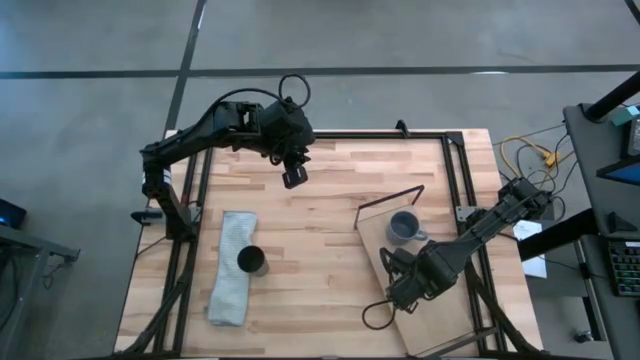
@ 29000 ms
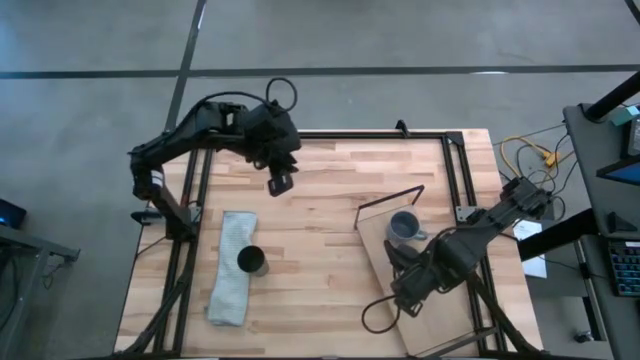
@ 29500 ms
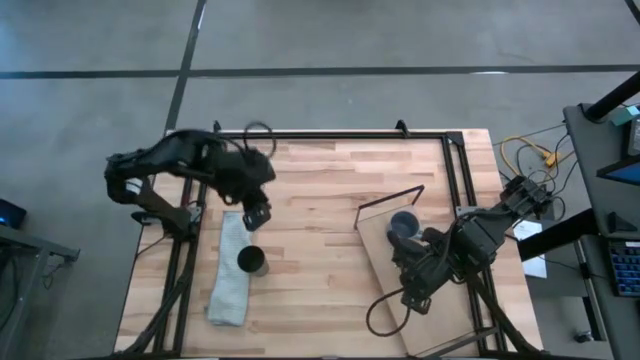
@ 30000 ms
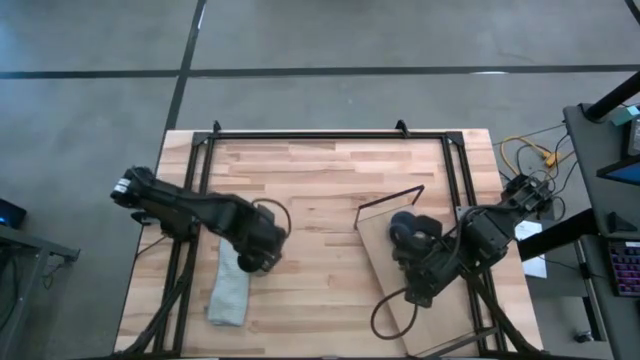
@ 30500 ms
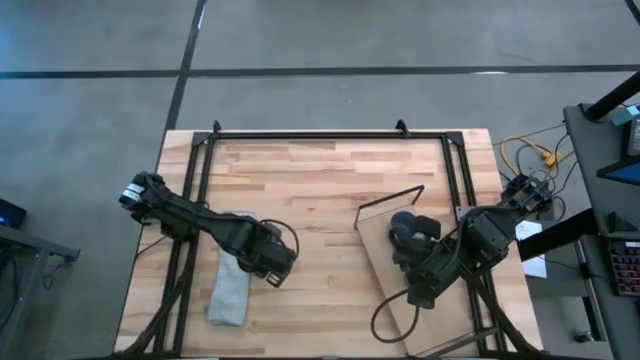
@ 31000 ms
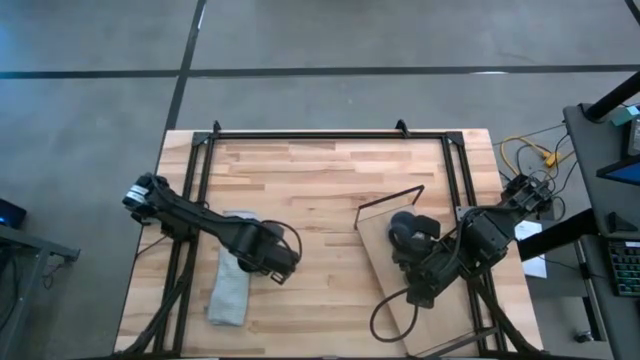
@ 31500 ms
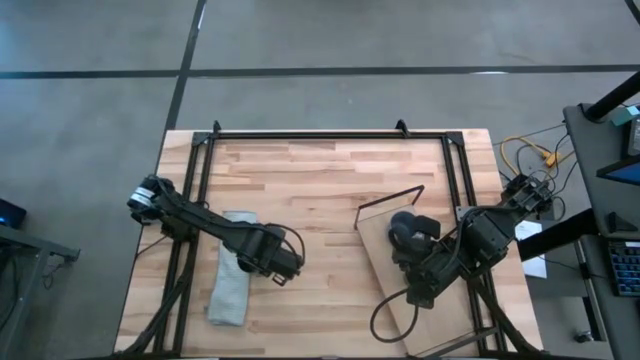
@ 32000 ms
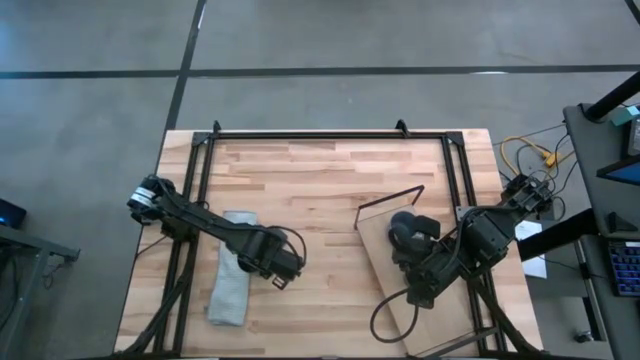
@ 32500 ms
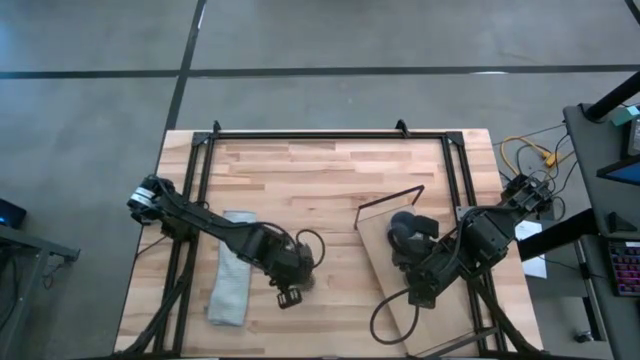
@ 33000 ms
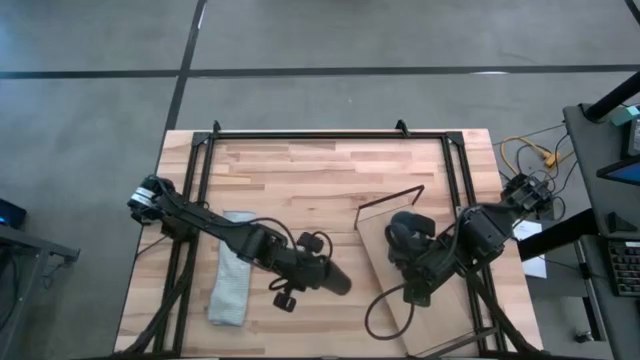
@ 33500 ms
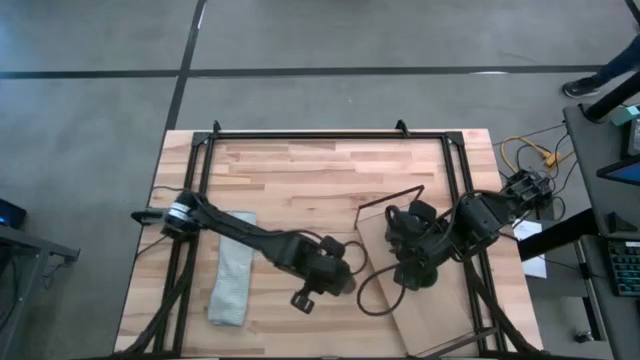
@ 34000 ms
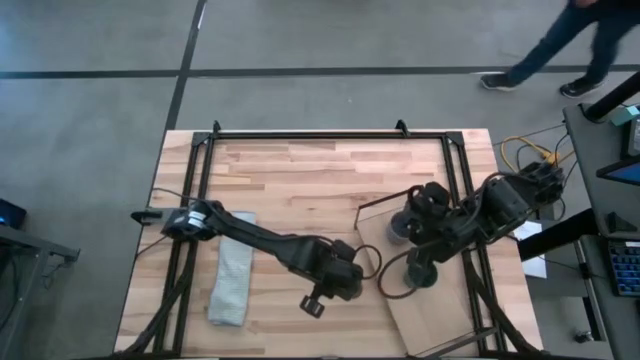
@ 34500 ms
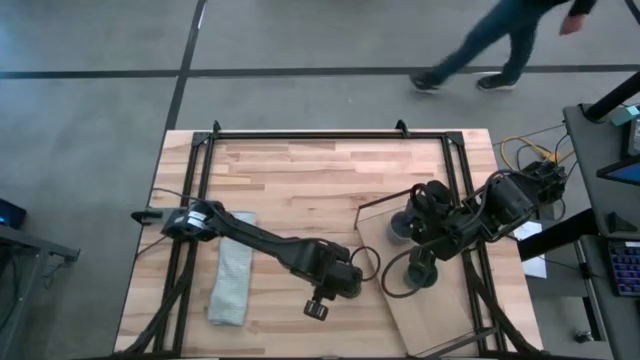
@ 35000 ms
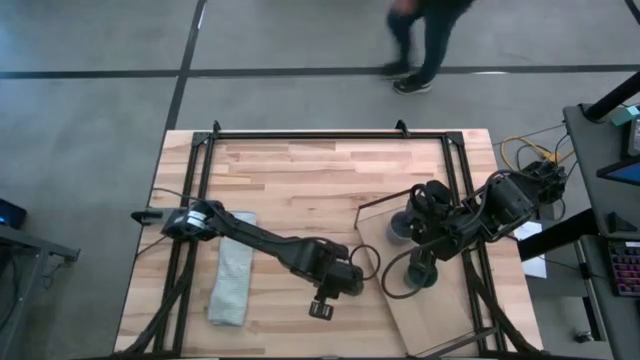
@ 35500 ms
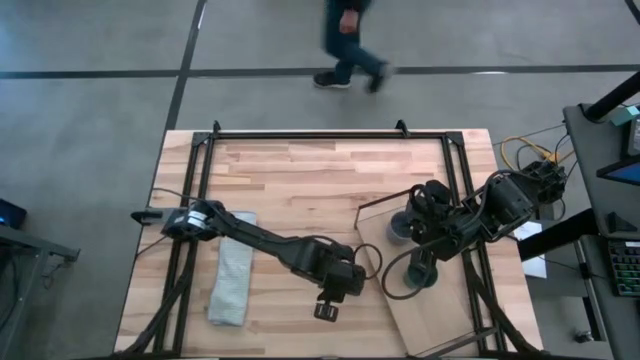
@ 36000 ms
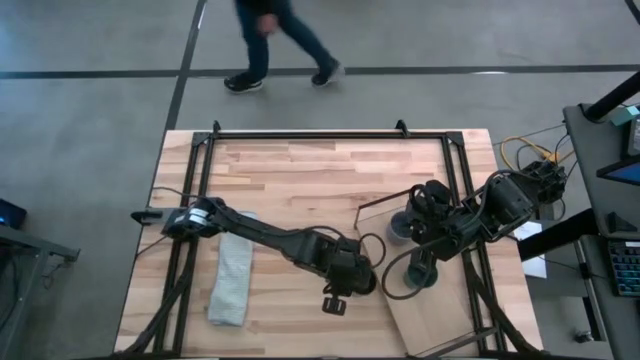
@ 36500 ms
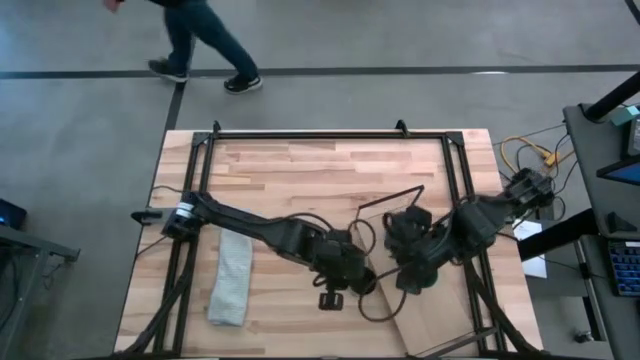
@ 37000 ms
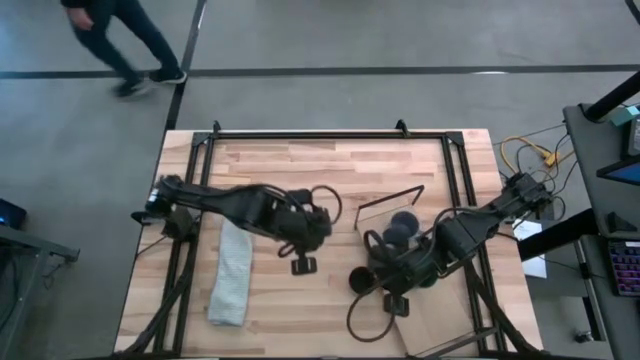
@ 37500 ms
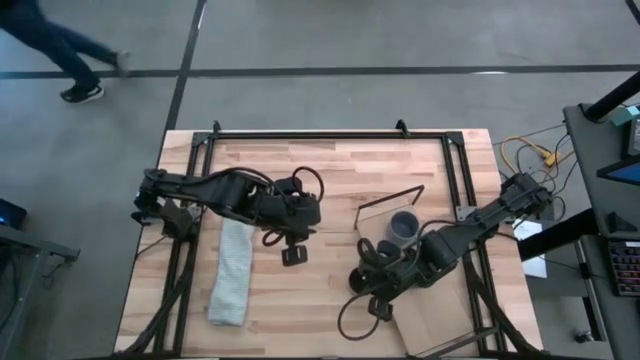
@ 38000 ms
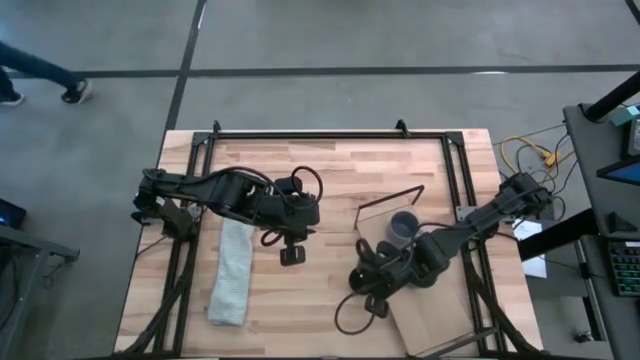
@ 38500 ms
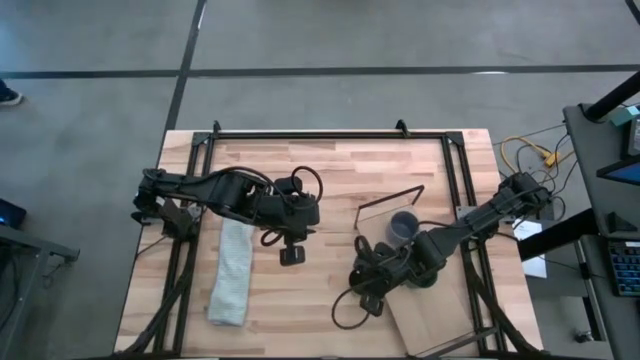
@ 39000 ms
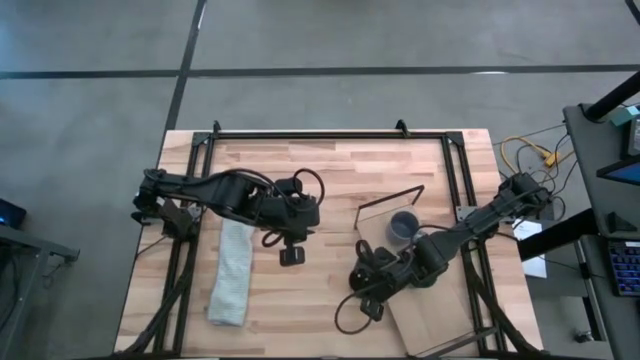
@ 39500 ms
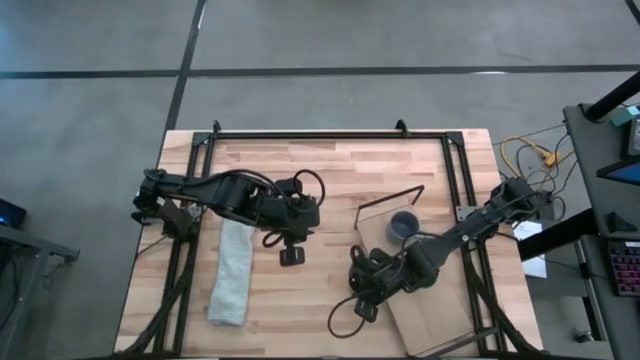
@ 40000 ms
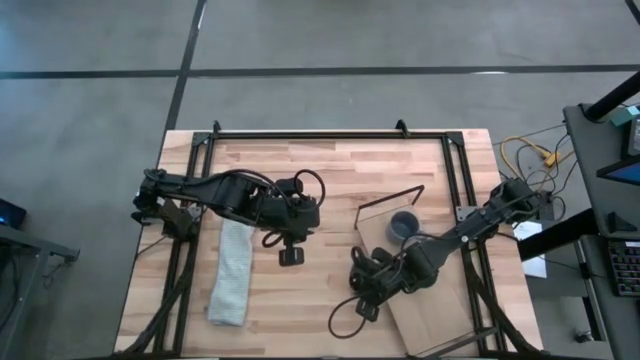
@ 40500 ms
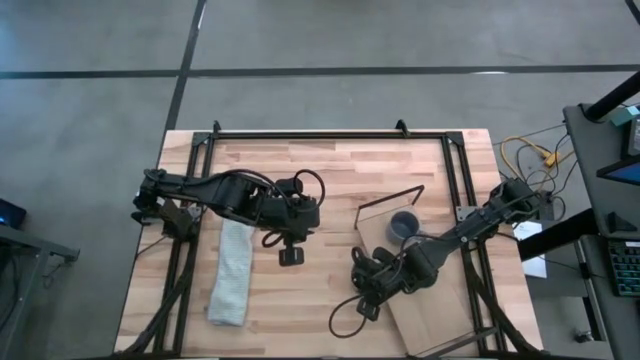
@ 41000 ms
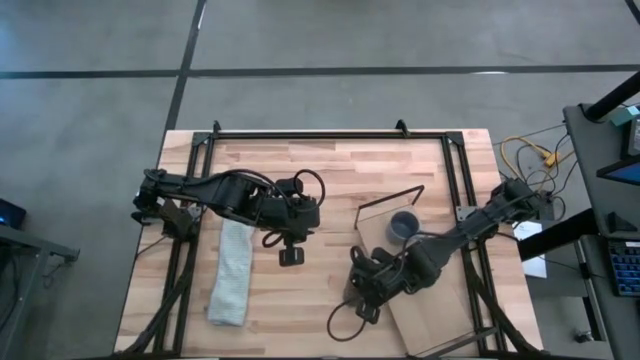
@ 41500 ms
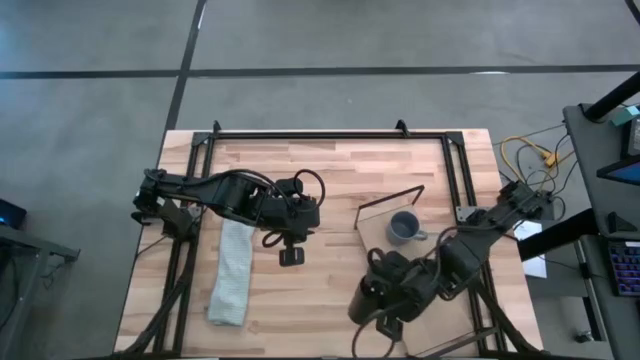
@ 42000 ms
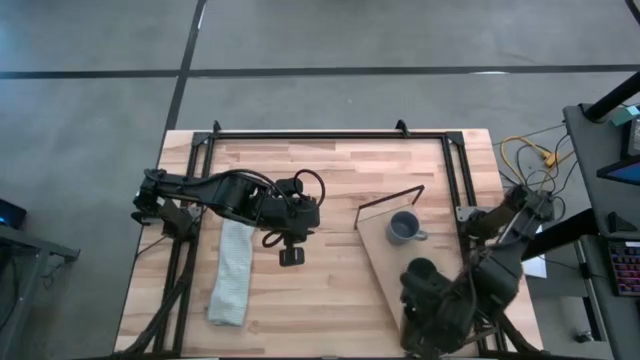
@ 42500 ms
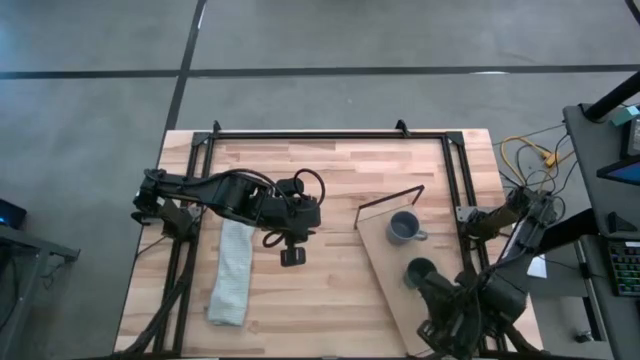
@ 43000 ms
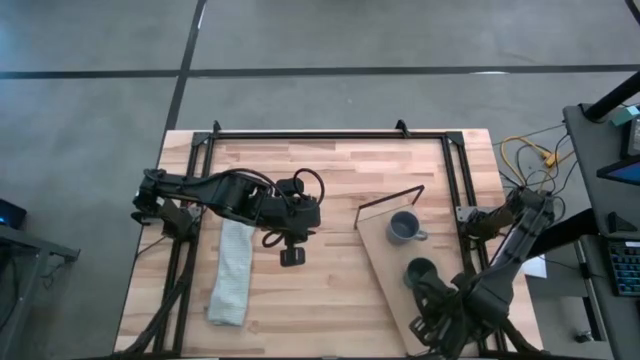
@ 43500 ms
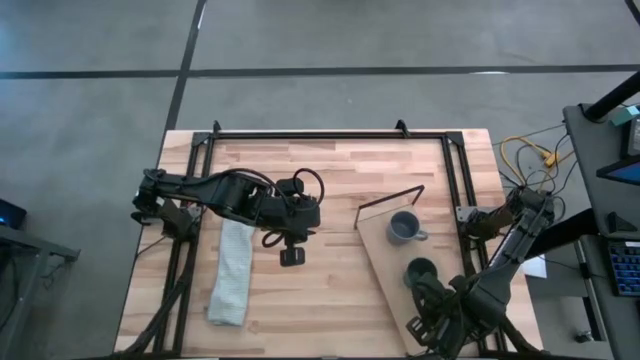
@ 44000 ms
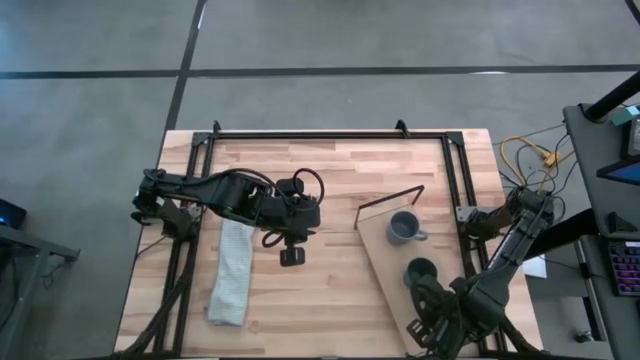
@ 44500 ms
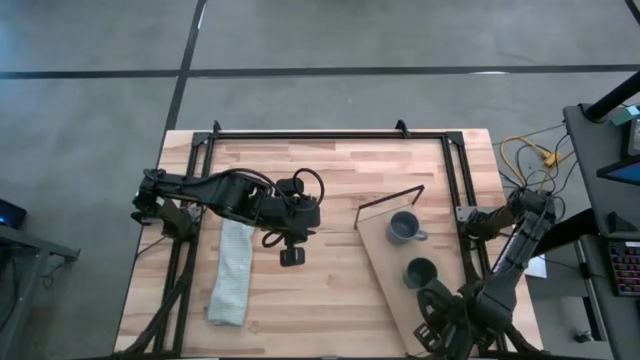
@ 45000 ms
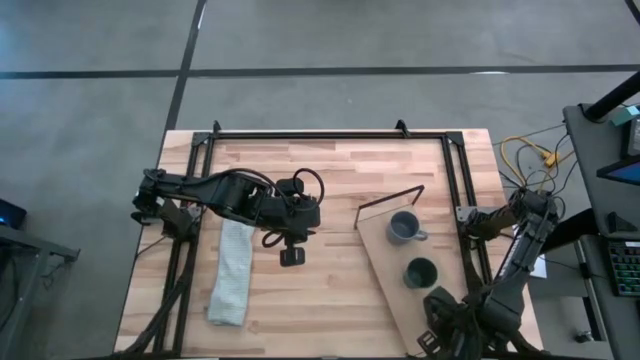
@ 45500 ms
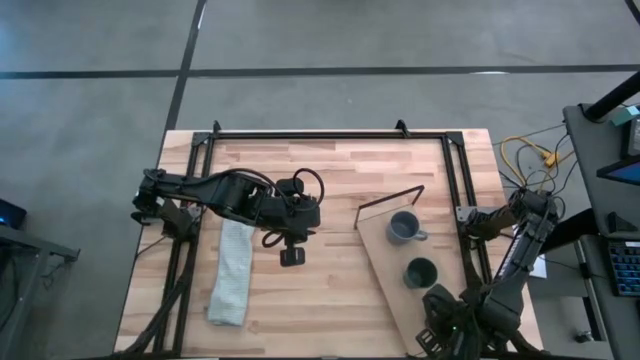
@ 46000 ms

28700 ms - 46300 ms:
Task: Stack small to large cups/mugs on shelf
Put the black cup on the shelf

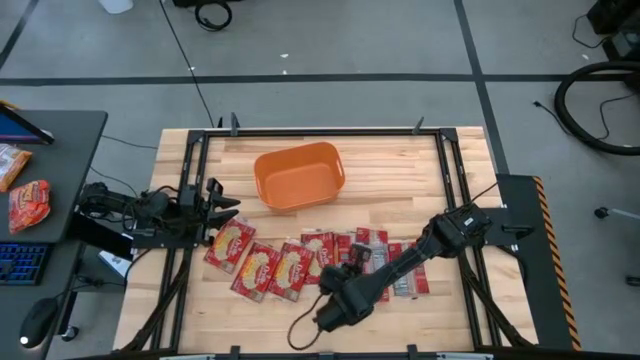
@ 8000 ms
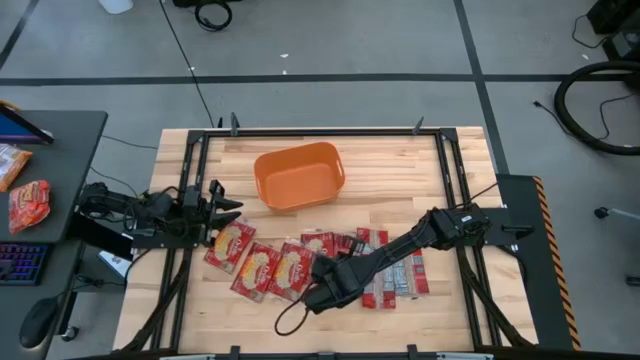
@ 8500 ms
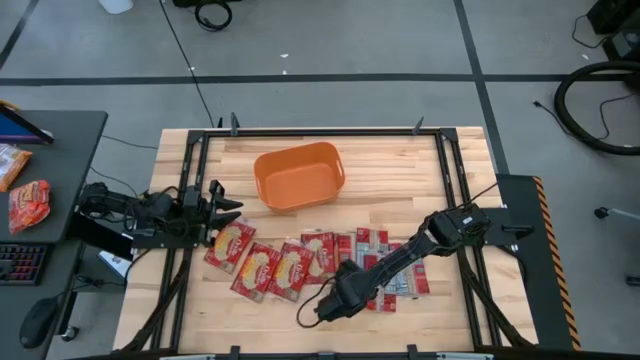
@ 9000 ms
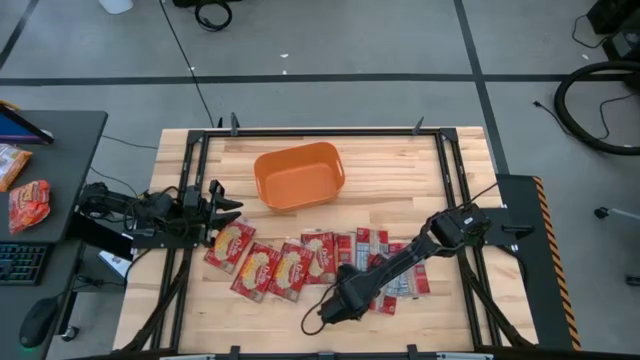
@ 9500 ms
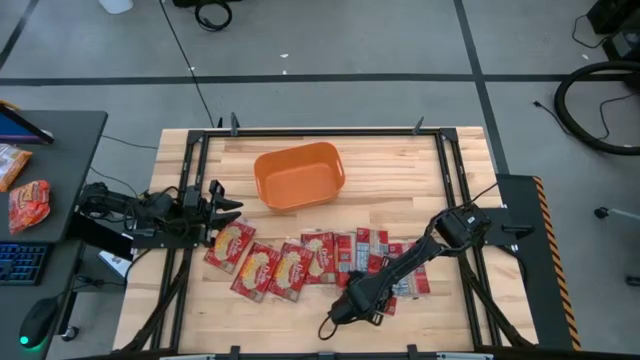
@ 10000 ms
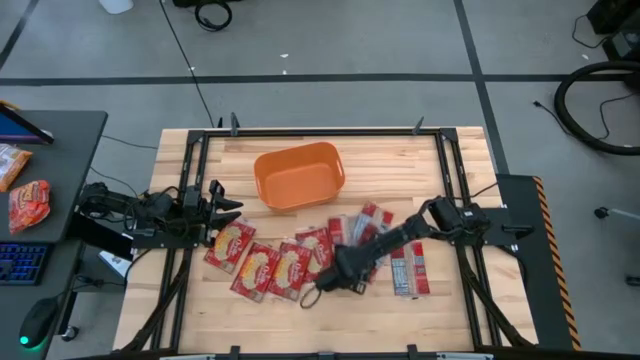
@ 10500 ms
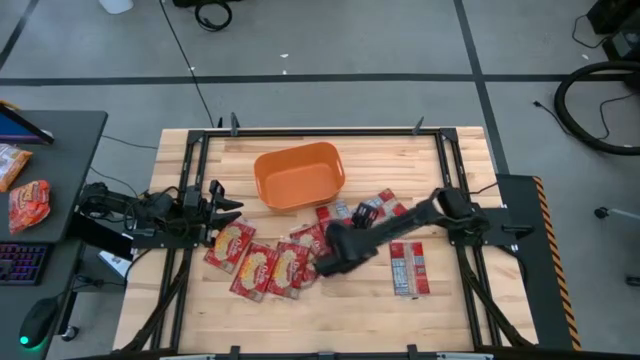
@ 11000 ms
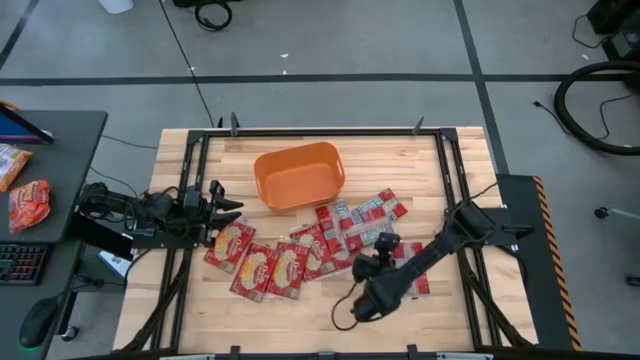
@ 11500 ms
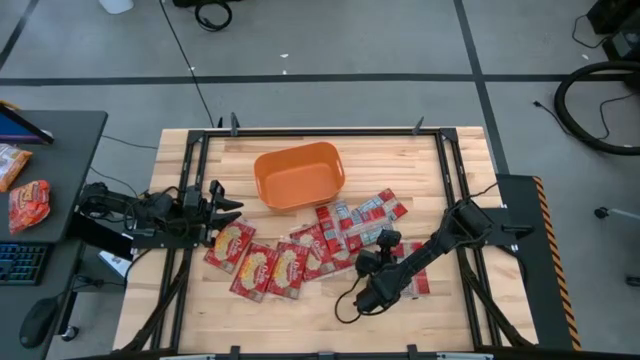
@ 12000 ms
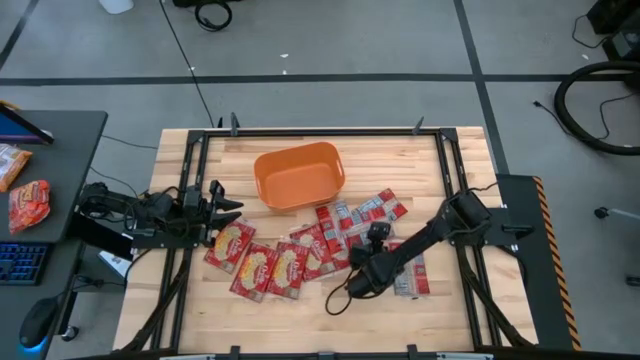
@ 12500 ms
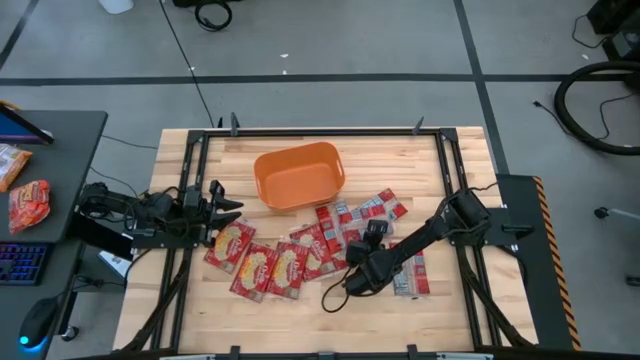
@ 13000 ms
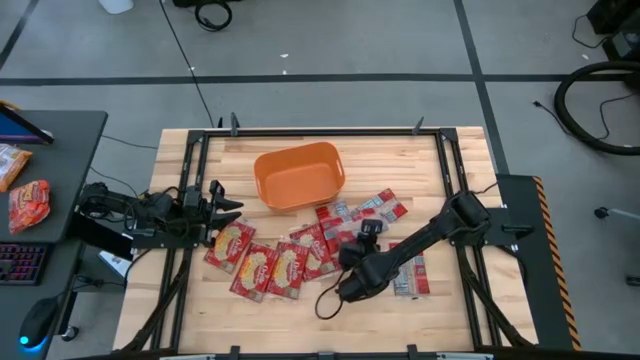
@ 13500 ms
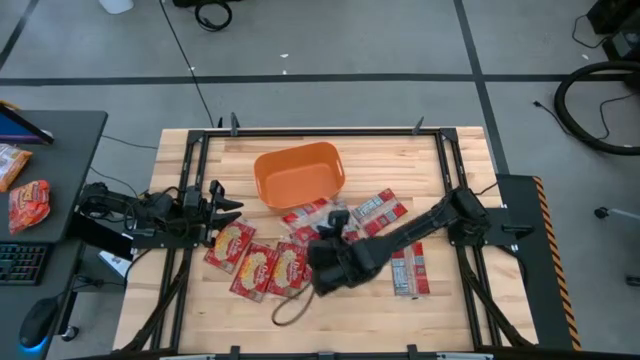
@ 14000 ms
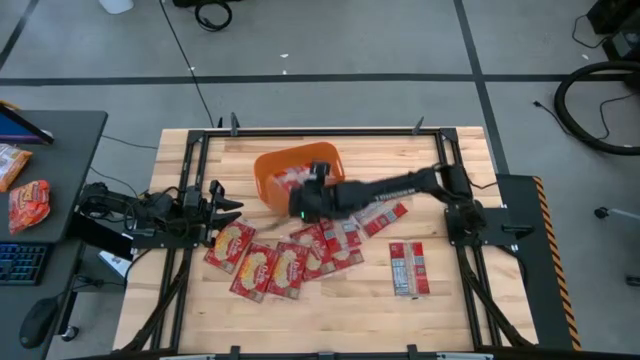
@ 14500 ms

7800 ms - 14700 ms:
Task: Sort popcorn bags into baskets
Put the popcorn bag into the orange bin
